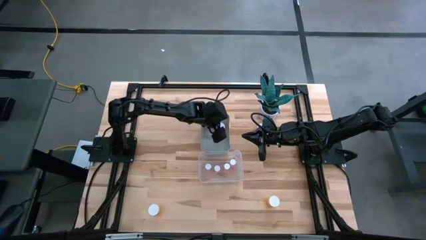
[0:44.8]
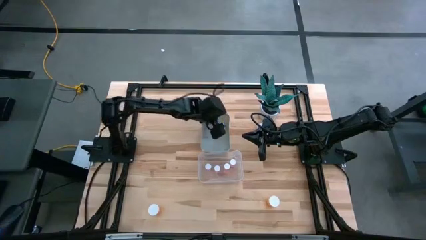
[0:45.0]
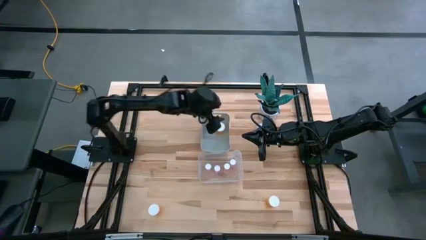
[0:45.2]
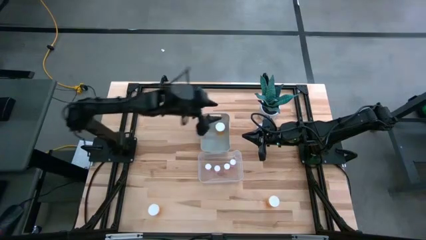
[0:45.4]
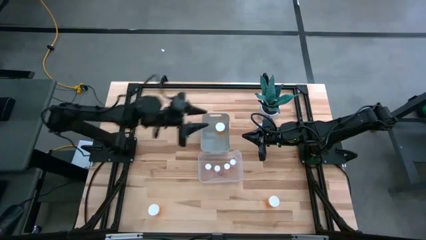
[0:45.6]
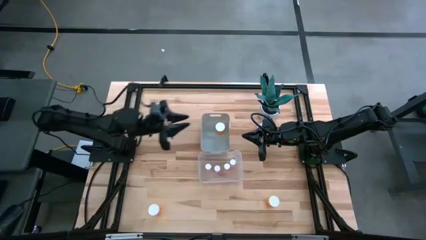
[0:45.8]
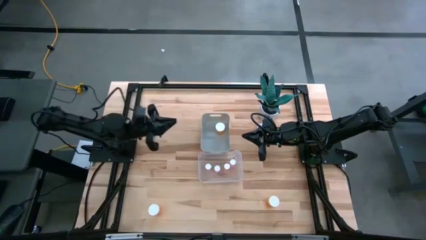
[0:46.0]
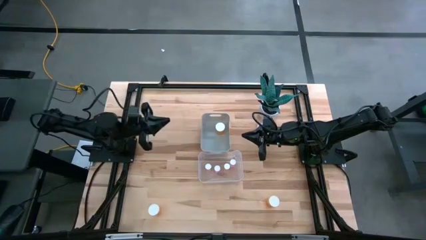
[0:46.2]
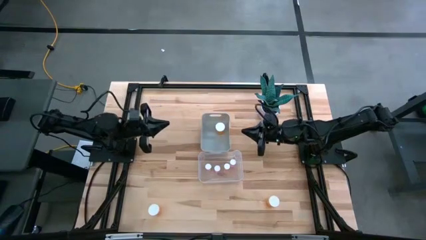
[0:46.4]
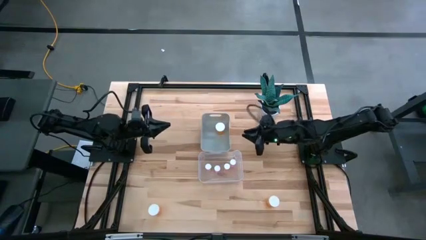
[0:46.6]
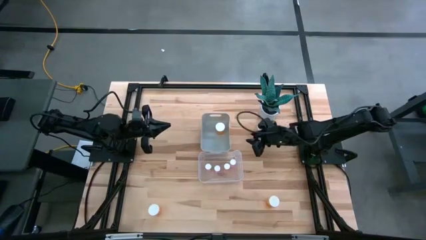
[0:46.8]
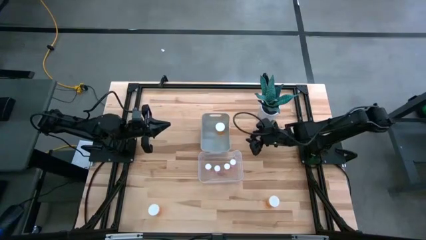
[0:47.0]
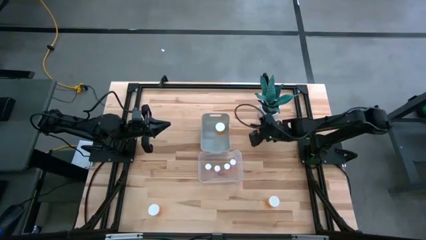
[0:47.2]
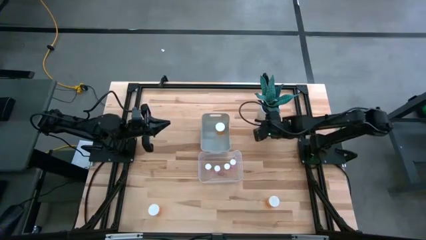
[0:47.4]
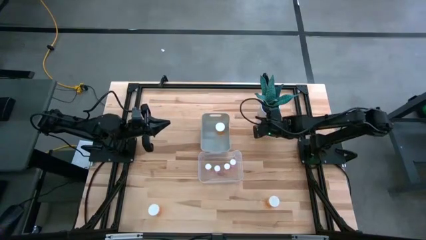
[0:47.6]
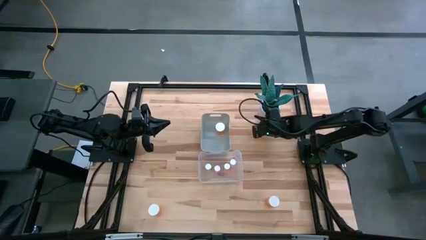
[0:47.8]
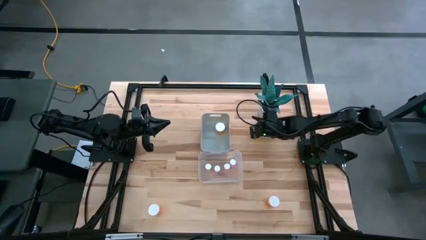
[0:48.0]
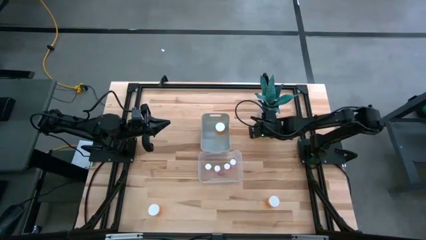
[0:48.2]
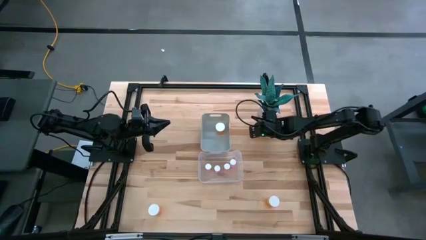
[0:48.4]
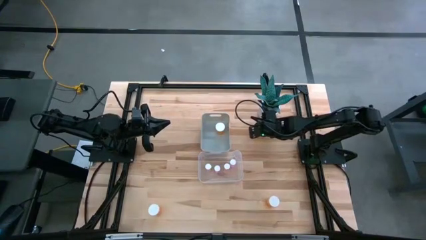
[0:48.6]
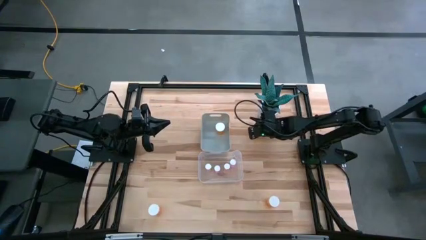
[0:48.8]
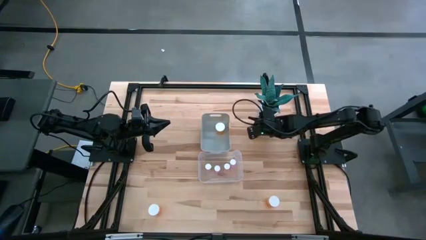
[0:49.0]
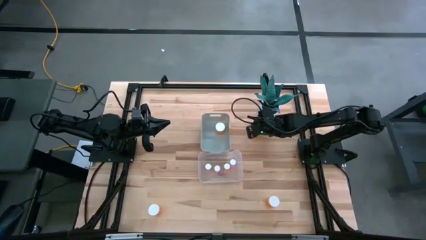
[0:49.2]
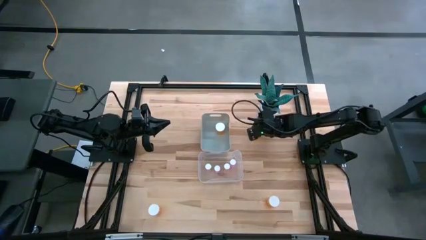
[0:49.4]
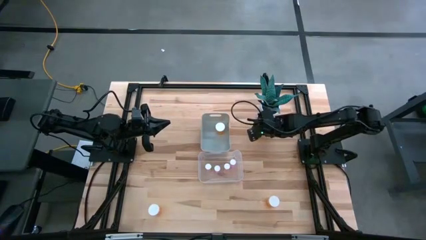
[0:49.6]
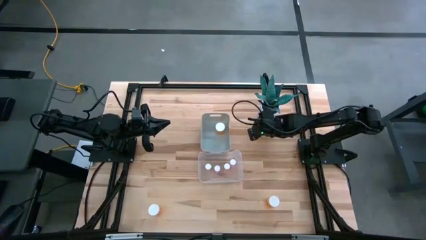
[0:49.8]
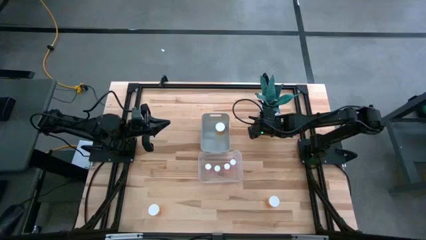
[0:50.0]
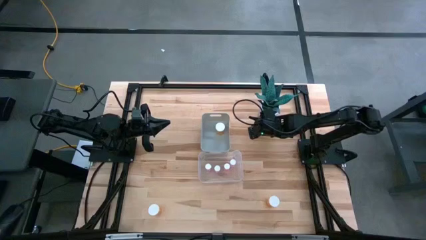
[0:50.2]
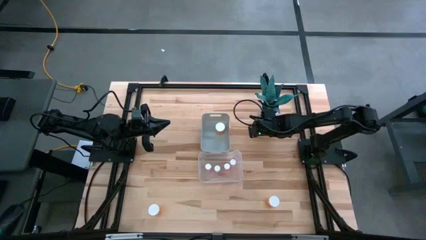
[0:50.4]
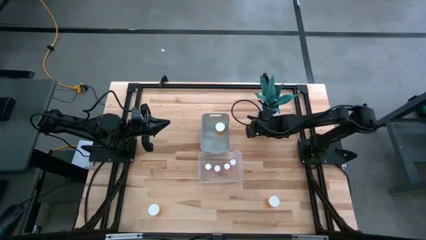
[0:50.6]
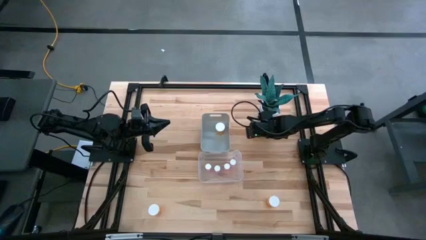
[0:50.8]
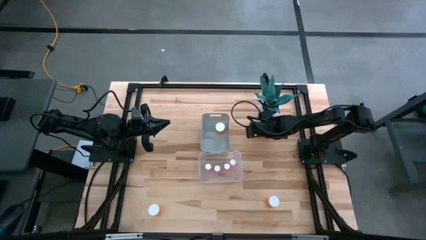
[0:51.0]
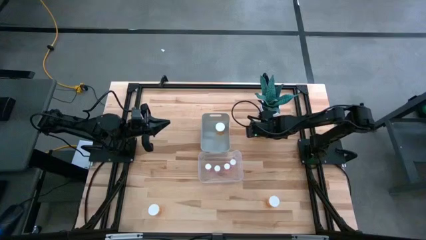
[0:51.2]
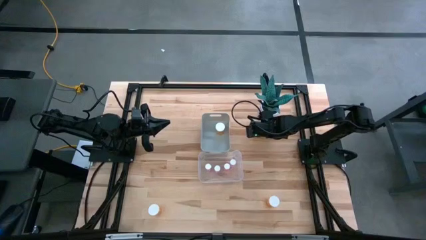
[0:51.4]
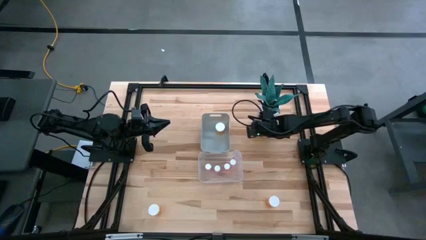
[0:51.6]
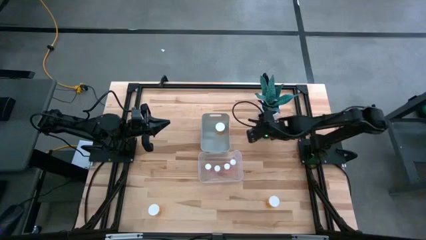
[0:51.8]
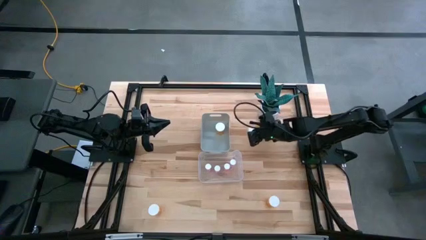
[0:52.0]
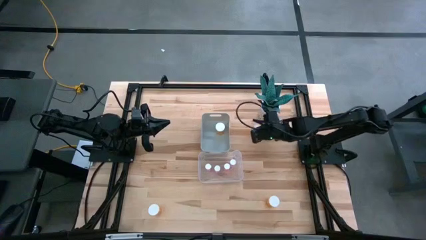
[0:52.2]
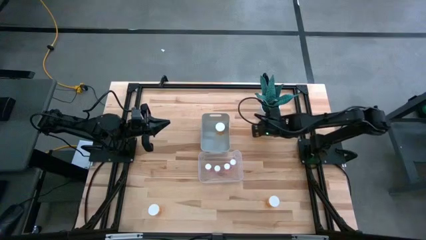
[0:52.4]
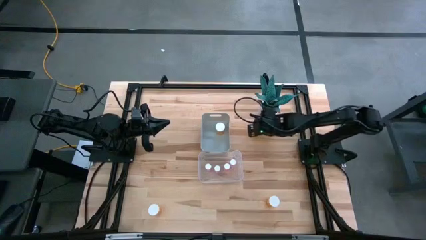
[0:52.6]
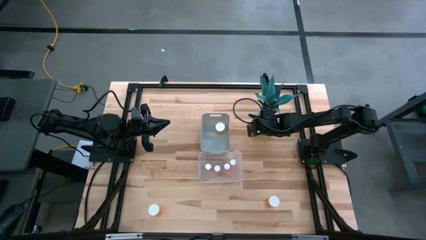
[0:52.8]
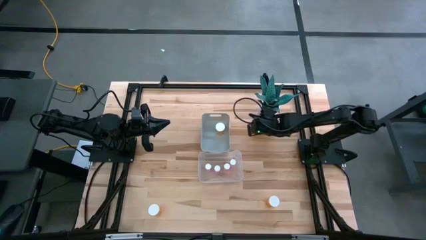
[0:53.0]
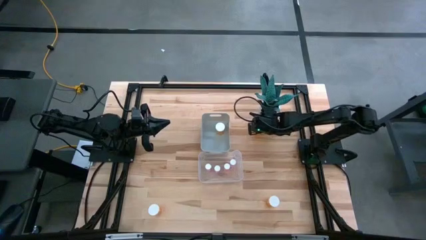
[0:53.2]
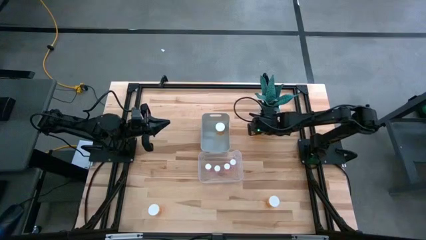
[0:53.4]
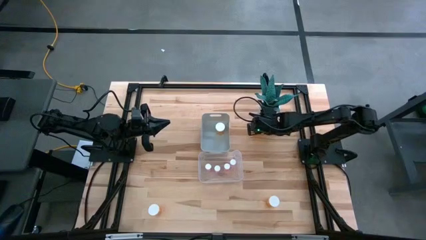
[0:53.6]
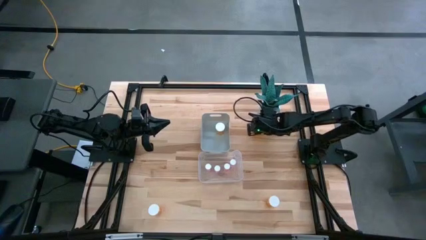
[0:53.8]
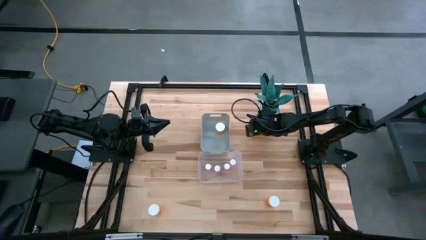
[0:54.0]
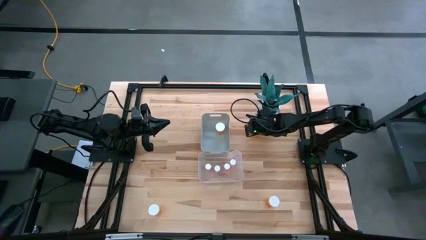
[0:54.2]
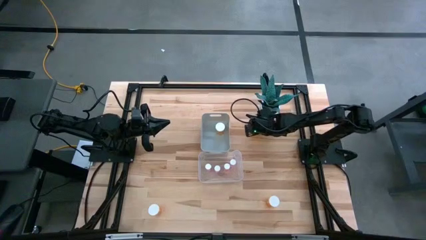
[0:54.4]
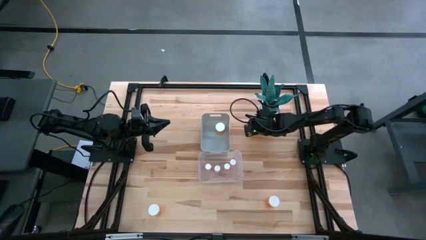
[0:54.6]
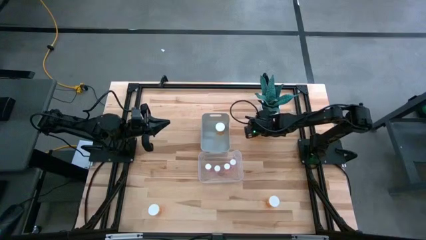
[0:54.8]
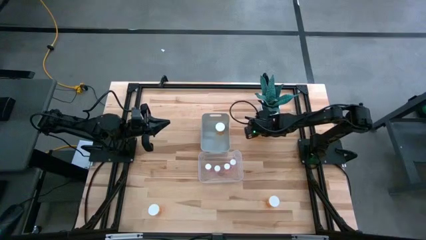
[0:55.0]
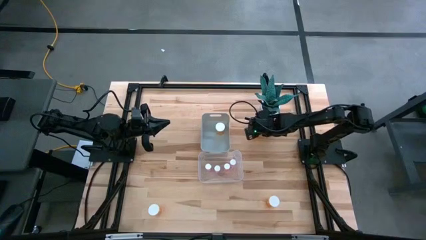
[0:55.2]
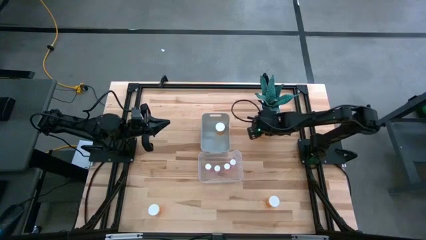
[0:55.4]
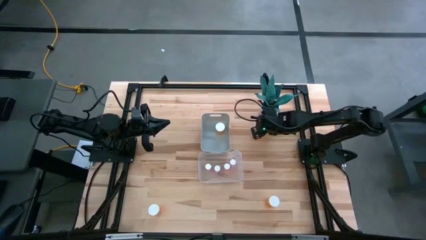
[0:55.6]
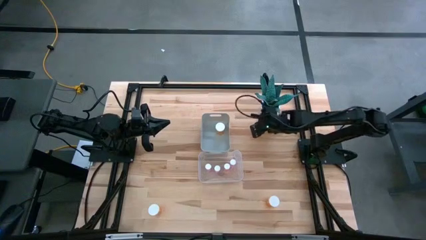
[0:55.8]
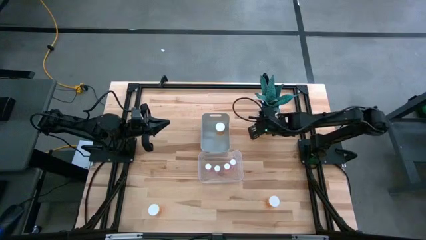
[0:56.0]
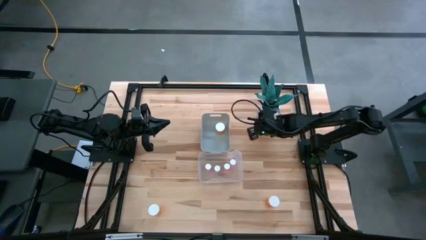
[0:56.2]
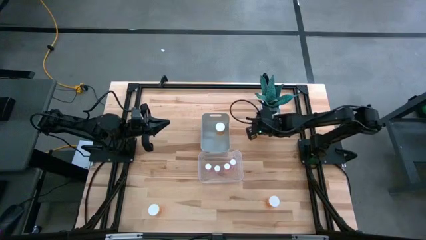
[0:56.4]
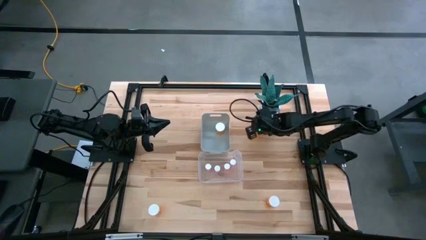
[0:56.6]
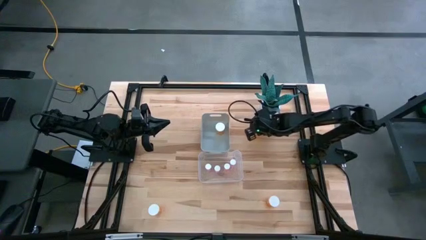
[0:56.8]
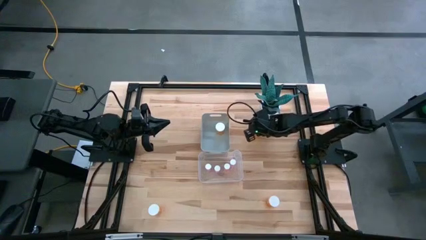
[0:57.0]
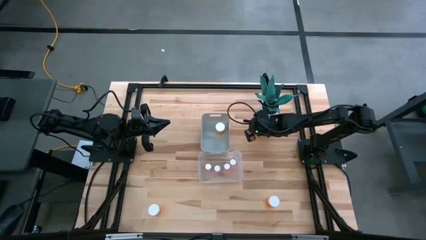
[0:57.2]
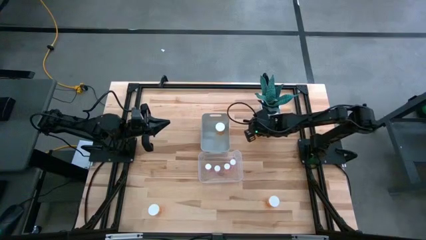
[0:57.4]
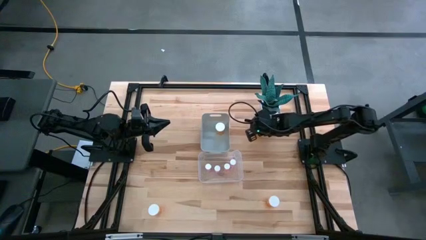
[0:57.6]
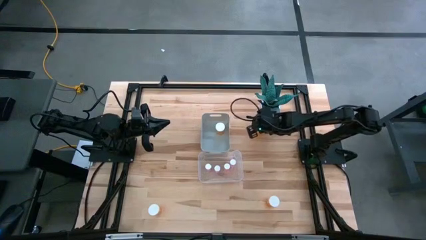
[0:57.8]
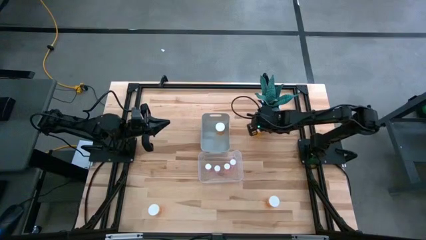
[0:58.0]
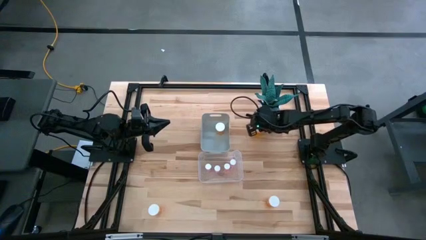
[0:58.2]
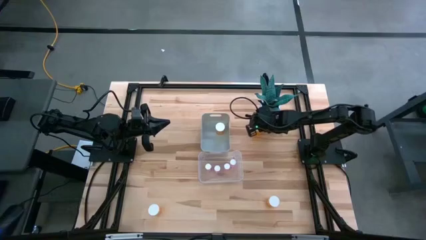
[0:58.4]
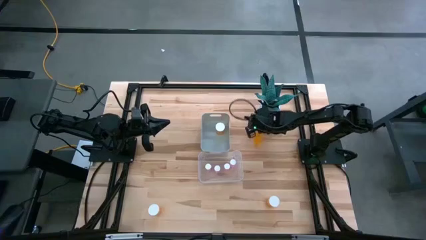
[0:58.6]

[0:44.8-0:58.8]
Task: Pick and place medicine bottles into bin by pill shape (circle, oval)
Put the top right orange pill bottle into the gray bin

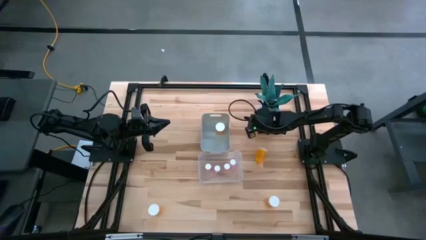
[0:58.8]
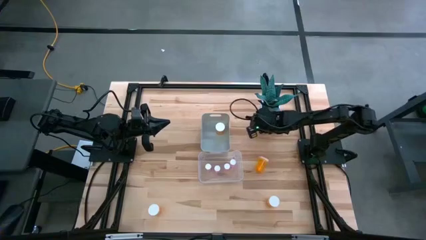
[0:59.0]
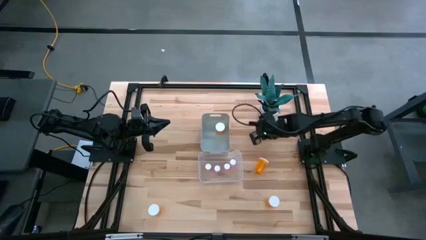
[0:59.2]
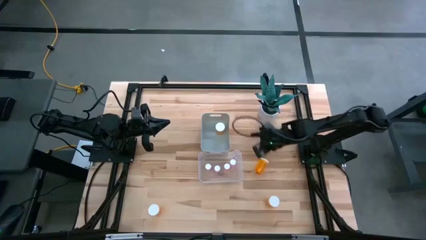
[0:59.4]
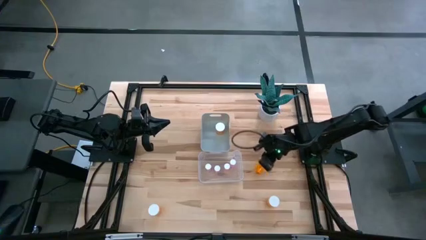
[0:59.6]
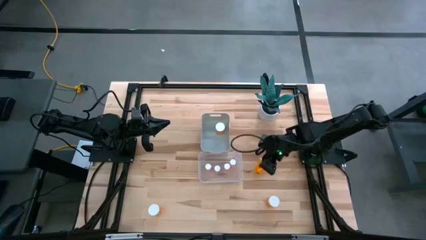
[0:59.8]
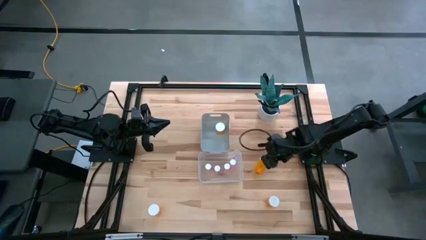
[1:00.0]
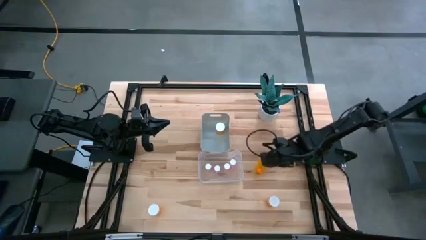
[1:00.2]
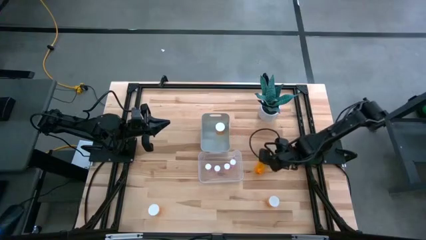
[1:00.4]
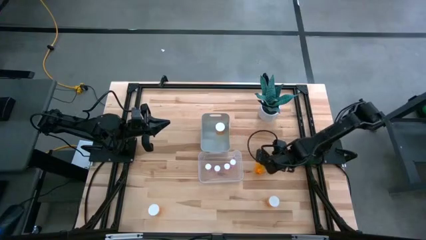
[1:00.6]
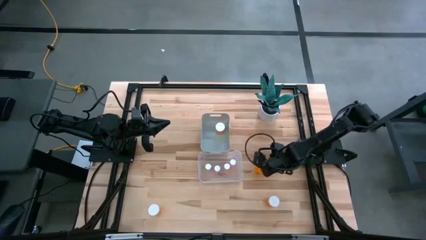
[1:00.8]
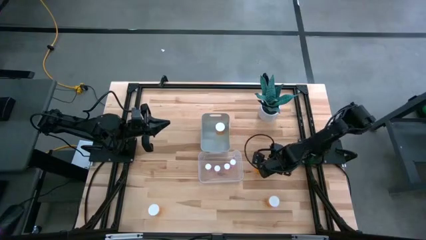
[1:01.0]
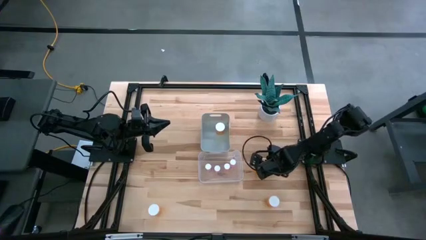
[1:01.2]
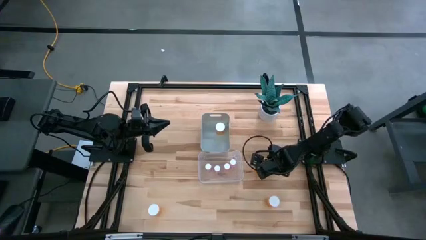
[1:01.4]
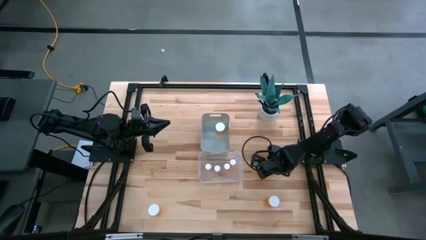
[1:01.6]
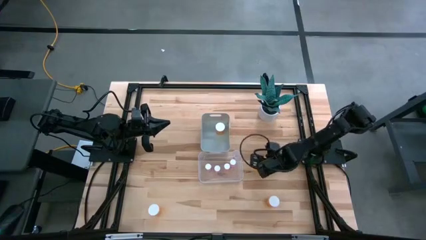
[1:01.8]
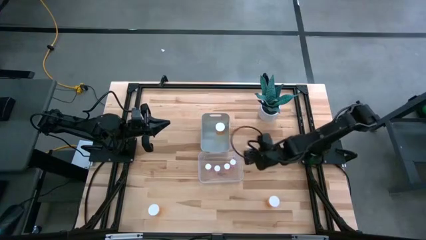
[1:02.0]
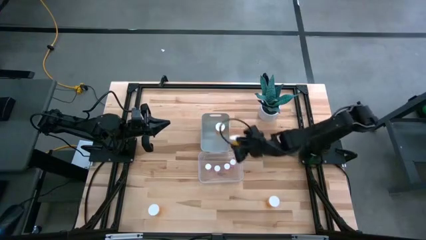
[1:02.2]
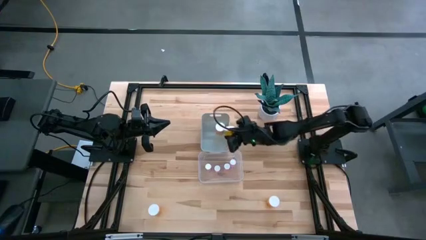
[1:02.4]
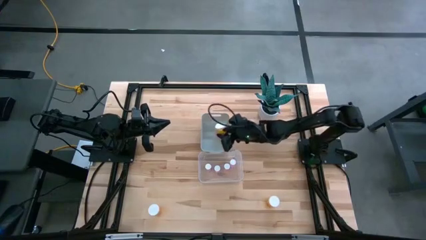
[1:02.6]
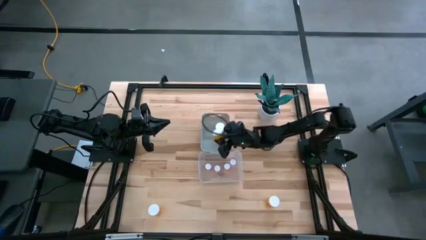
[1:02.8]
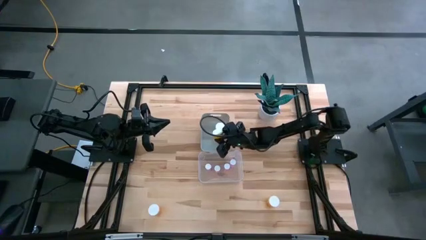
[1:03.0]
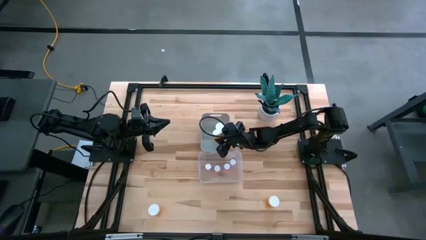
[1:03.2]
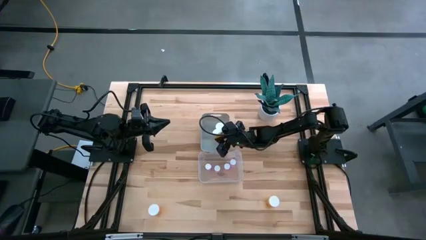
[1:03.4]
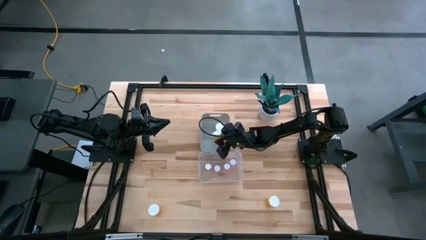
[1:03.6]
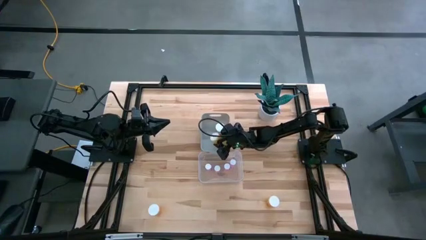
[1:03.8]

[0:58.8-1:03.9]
Put the top right orange pill bottle into the gray bin
